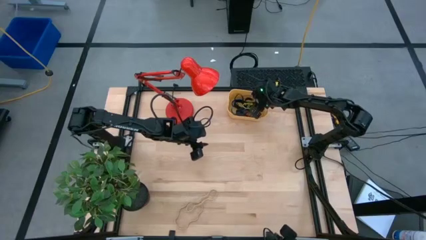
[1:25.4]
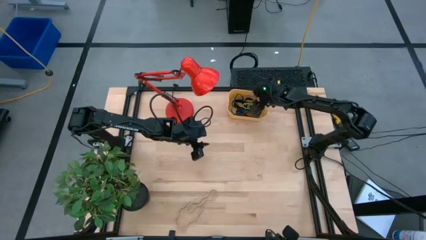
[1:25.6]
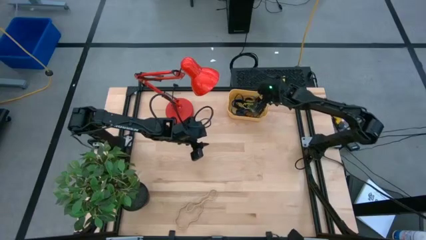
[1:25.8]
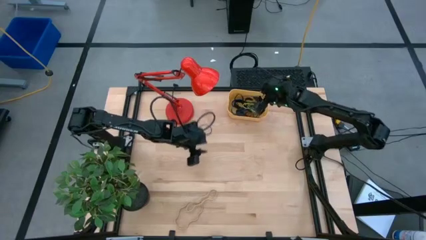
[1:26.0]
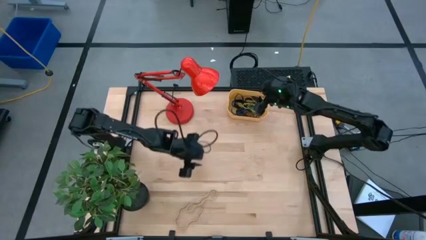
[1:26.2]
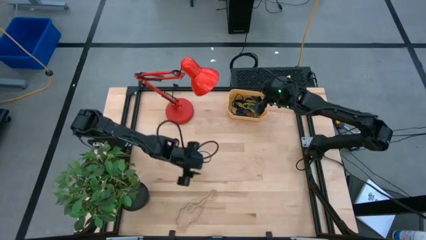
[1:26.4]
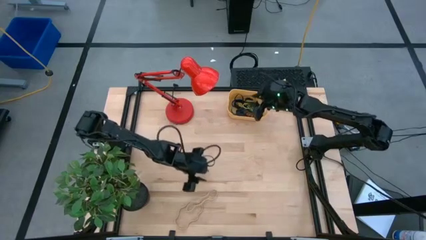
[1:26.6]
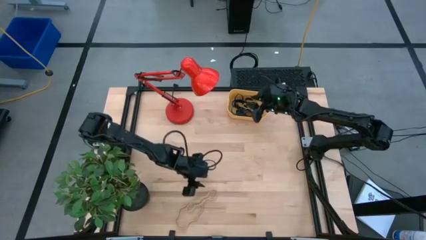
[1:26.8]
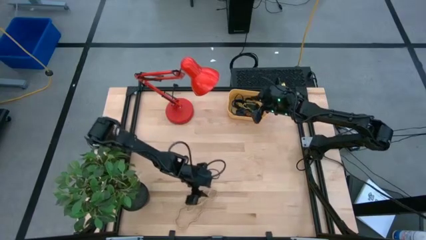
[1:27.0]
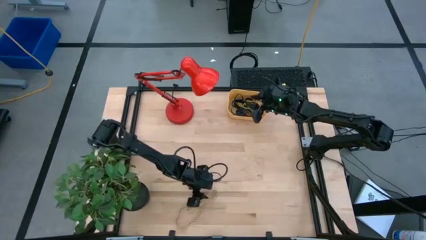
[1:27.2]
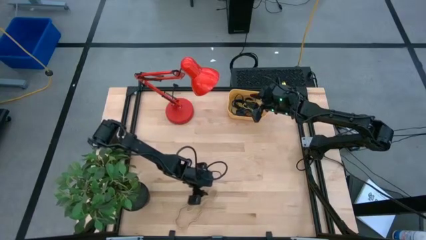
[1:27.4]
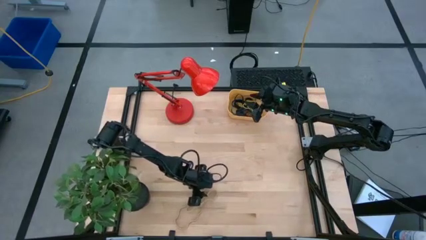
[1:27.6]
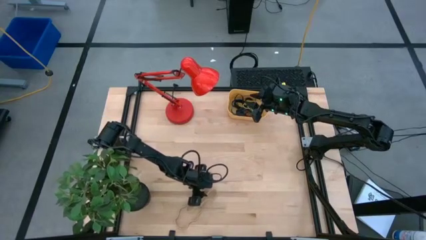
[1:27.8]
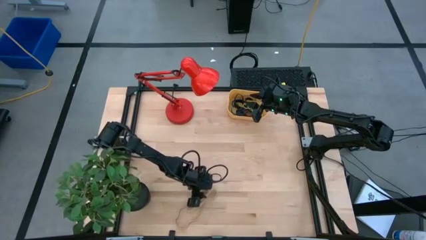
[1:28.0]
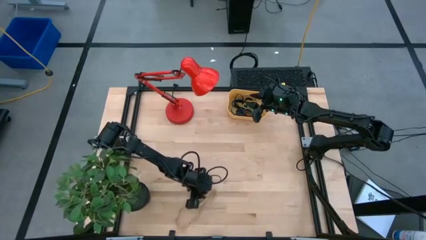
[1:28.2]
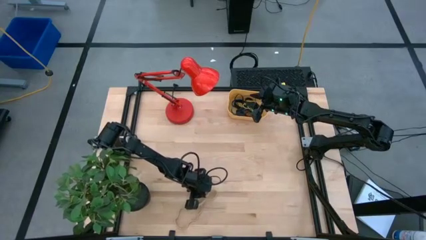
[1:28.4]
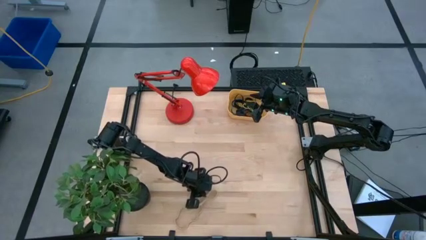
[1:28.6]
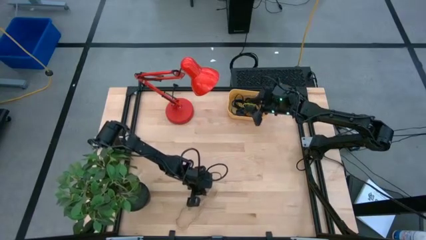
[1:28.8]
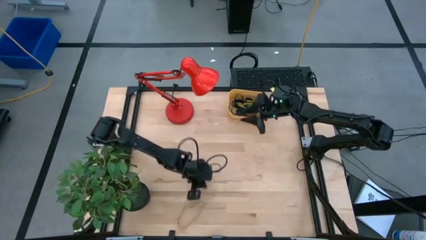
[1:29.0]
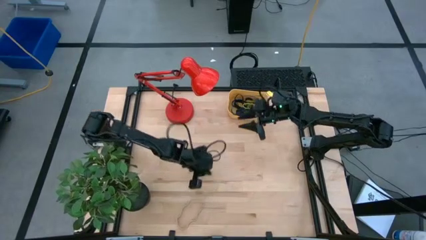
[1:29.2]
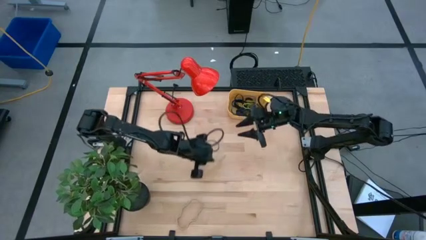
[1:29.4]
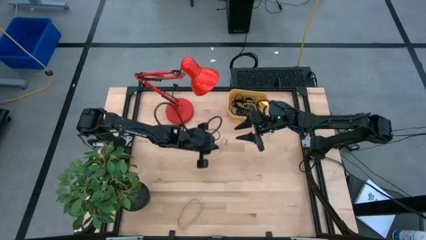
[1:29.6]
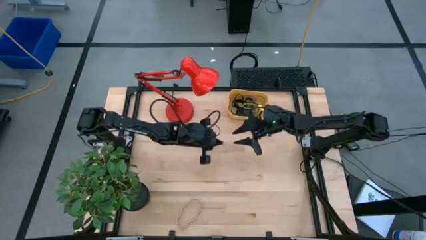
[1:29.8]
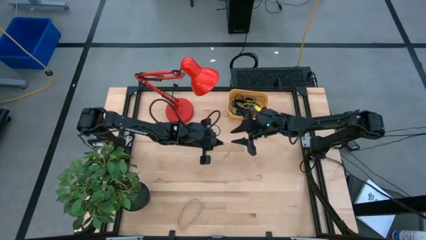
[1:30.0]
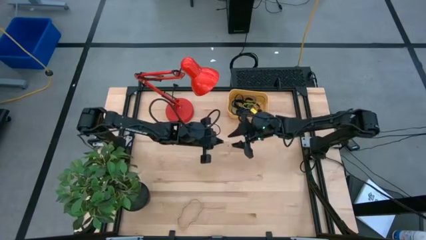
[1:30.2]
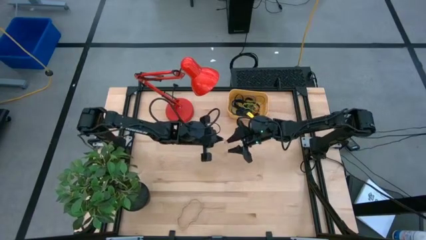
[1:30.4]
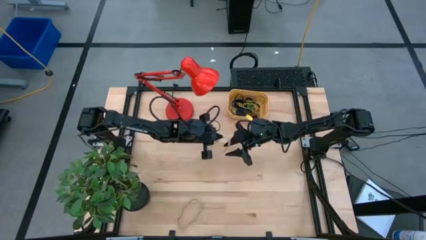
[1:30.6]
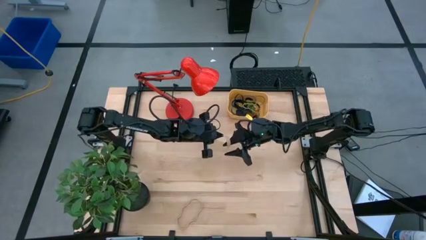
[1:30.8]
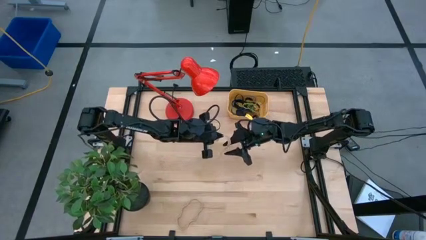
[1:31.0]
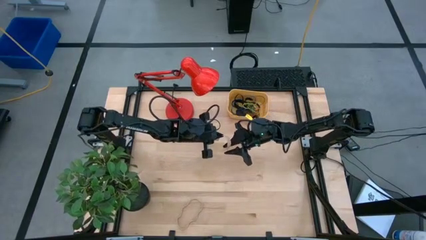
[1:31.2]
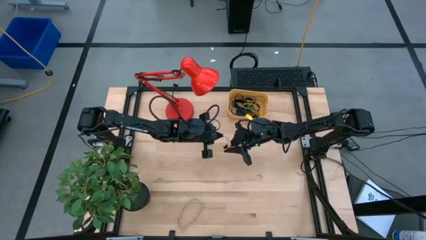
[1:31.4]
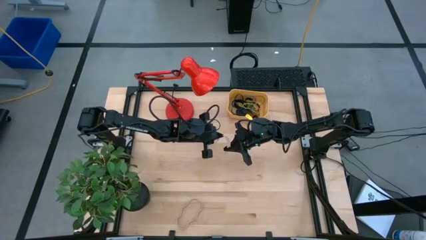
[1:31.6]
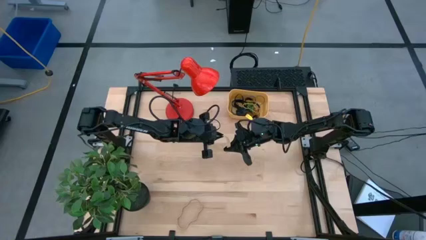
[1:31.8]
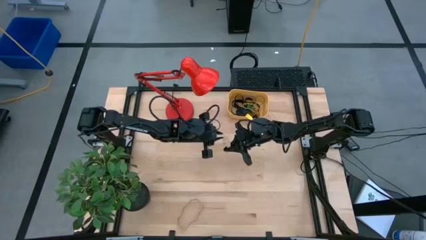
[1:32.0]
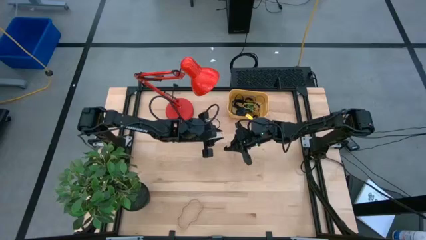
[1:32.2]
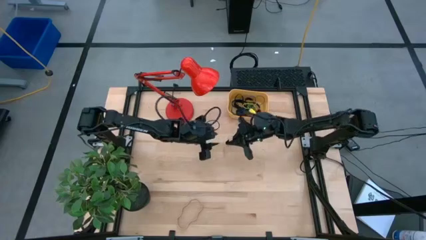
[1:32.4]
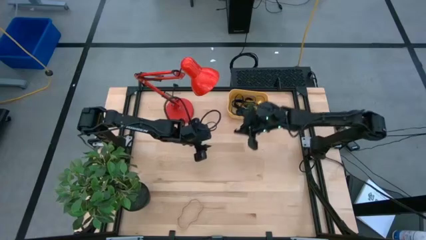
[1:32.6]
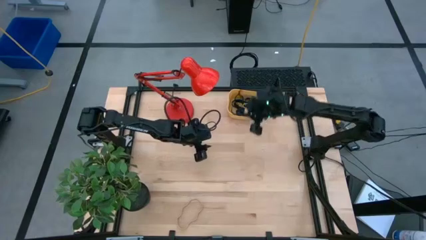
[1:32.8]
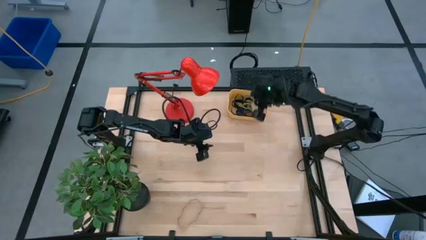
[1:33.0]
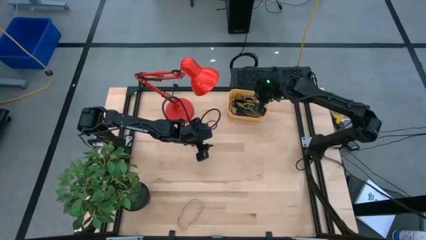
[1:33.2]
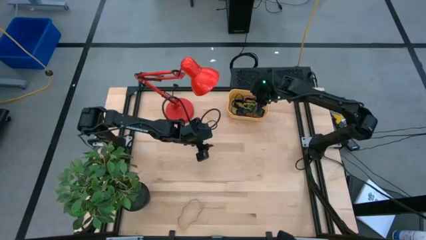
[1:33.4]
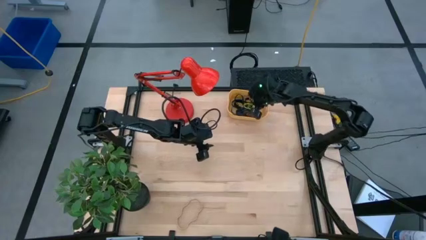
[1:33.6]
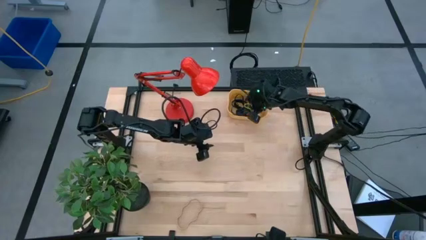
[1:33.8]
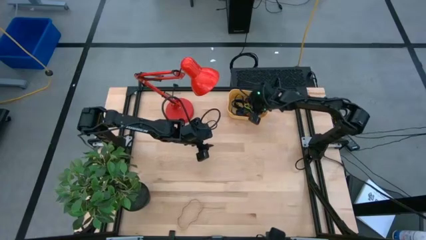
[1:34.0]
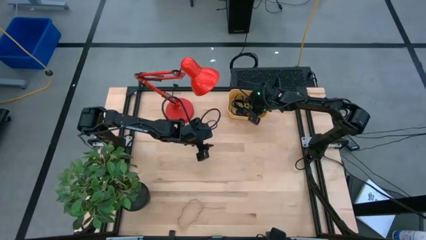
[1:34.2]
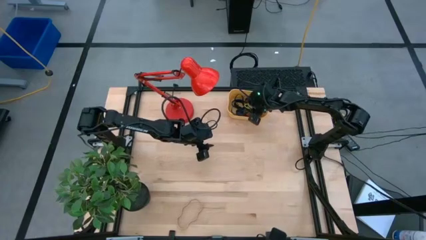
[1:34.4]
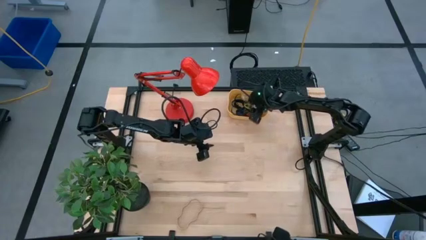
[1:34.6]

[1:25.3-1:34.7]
Task: Pick and place rubber bands into bin
Put the top white rubber band into the yellow container

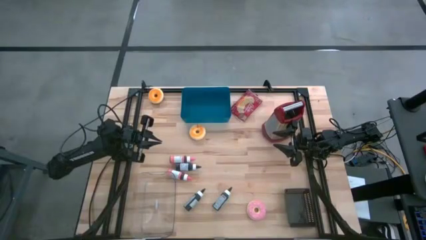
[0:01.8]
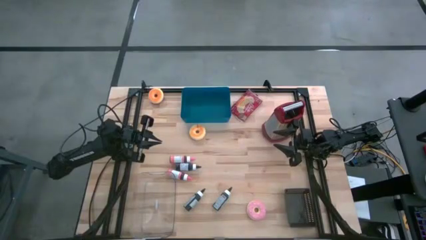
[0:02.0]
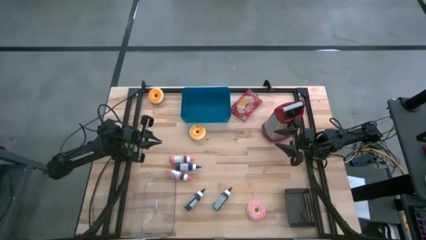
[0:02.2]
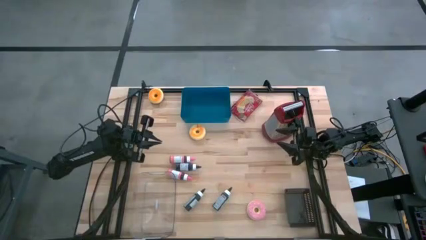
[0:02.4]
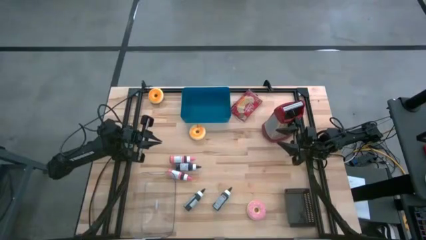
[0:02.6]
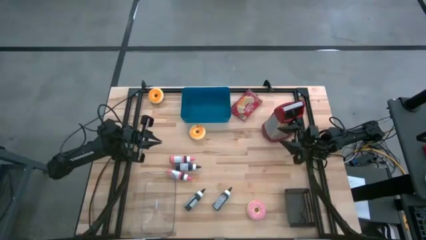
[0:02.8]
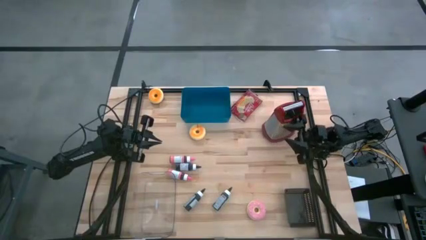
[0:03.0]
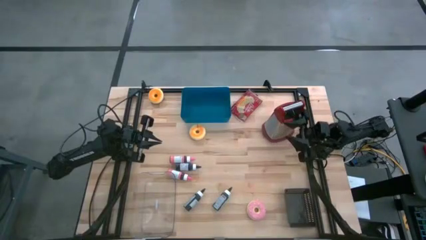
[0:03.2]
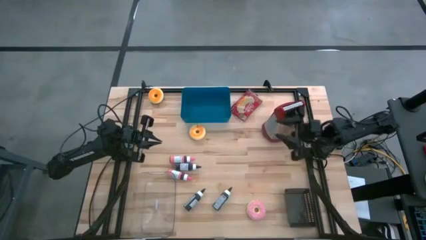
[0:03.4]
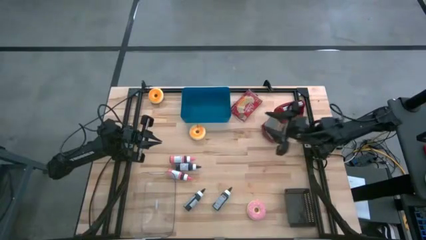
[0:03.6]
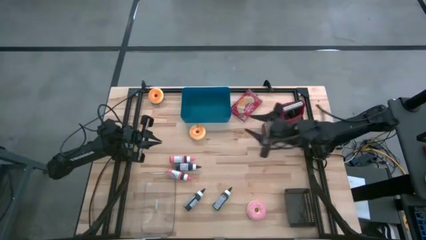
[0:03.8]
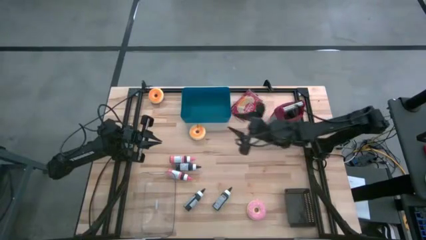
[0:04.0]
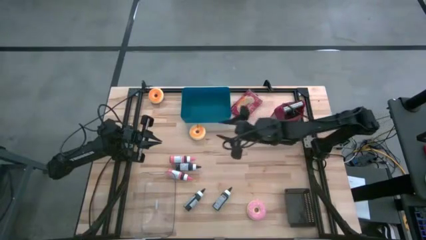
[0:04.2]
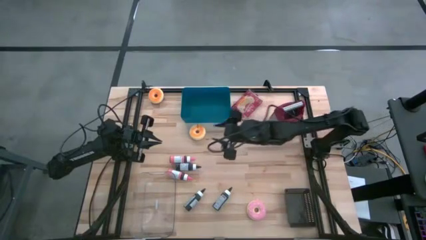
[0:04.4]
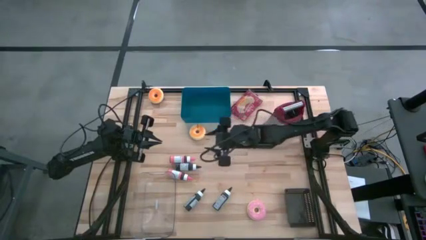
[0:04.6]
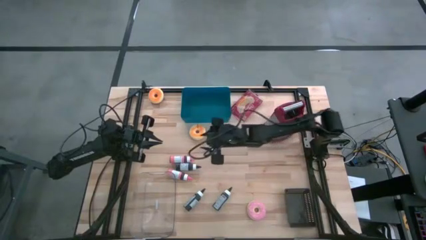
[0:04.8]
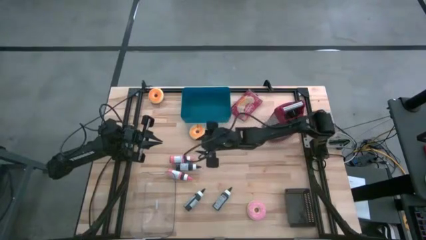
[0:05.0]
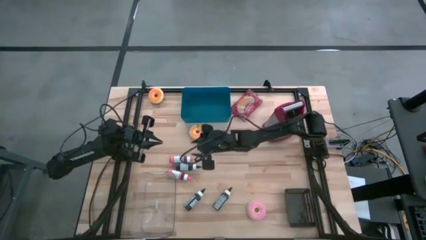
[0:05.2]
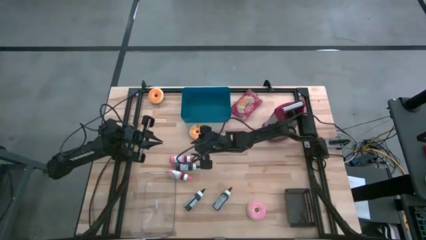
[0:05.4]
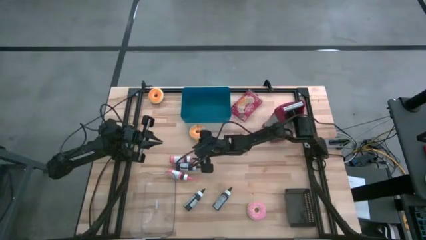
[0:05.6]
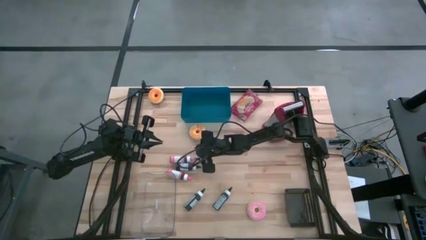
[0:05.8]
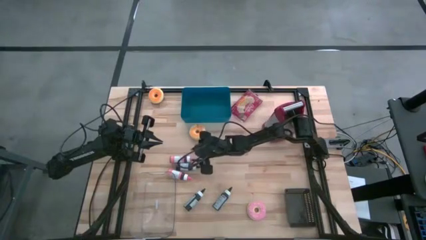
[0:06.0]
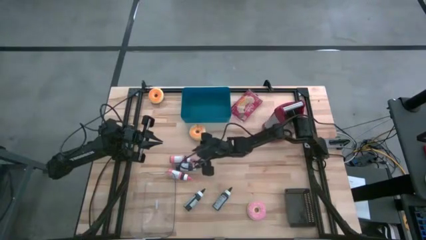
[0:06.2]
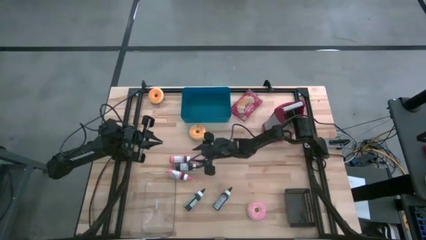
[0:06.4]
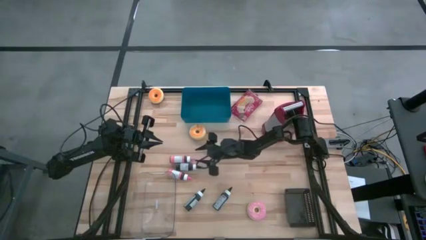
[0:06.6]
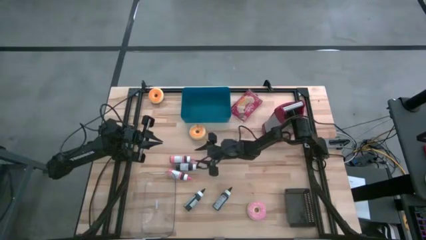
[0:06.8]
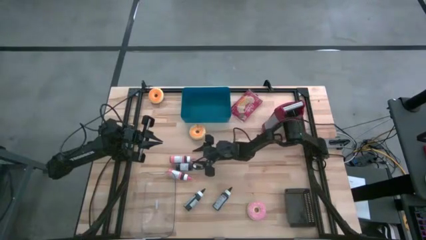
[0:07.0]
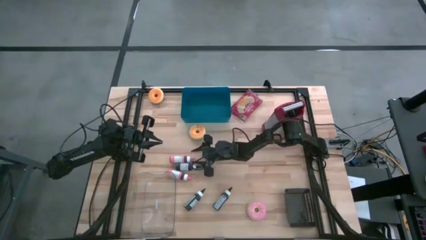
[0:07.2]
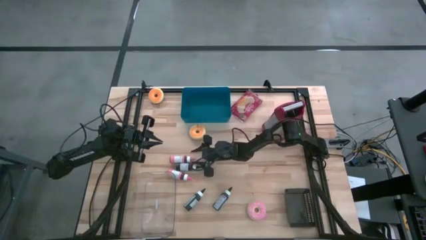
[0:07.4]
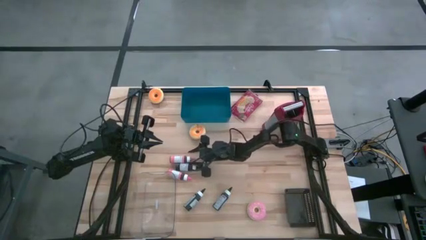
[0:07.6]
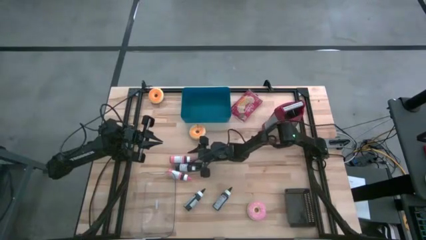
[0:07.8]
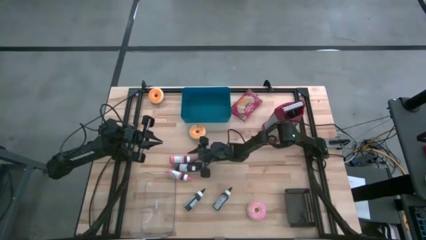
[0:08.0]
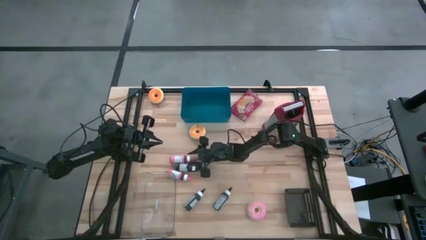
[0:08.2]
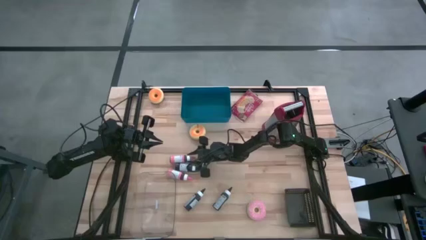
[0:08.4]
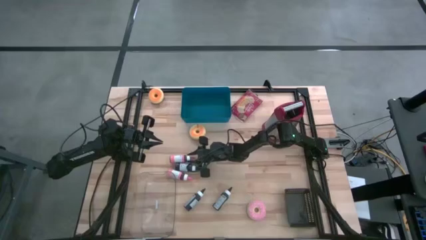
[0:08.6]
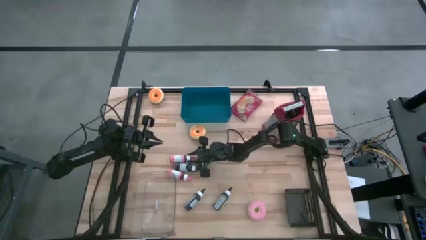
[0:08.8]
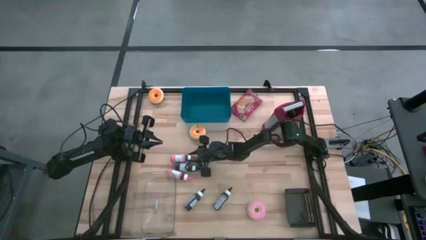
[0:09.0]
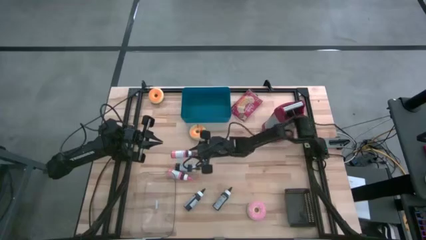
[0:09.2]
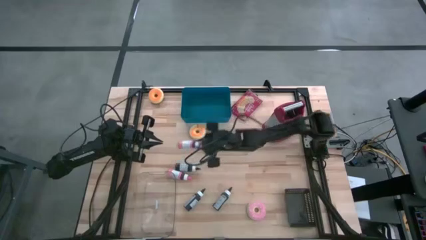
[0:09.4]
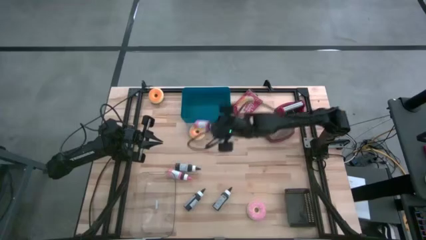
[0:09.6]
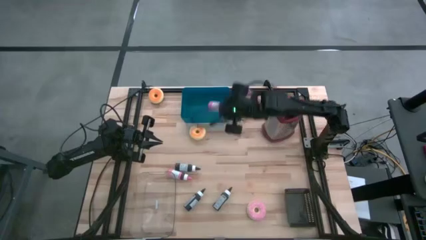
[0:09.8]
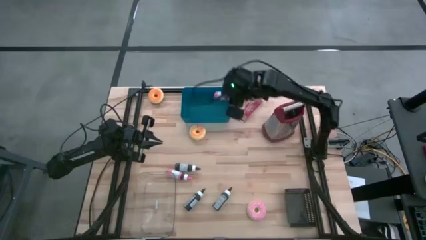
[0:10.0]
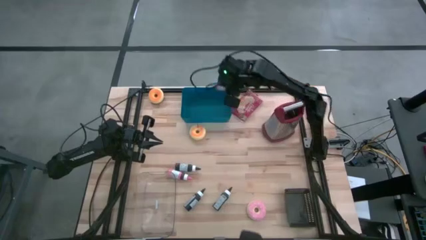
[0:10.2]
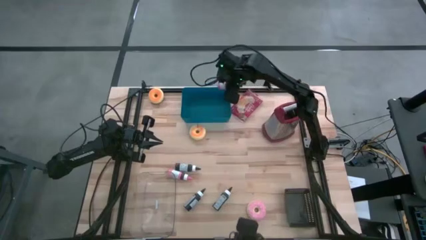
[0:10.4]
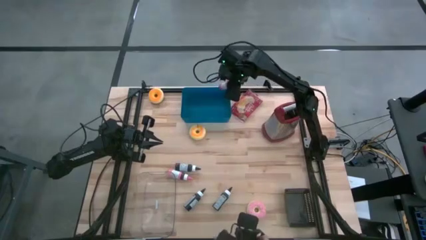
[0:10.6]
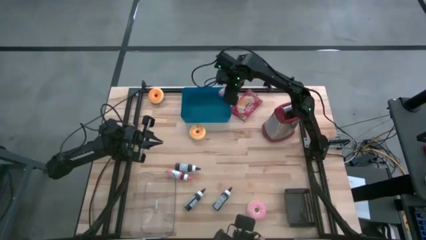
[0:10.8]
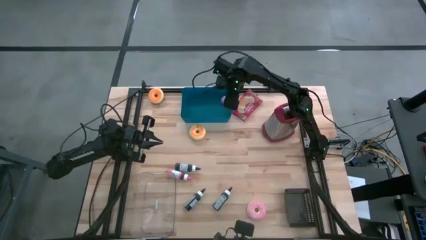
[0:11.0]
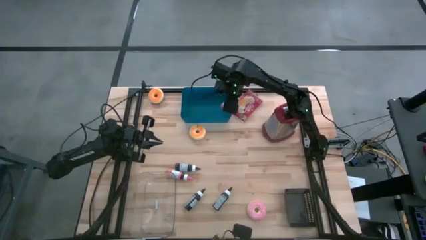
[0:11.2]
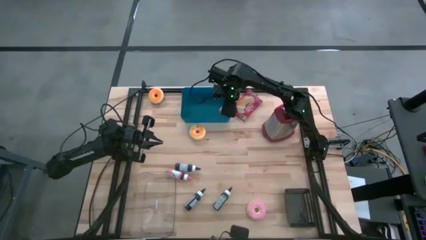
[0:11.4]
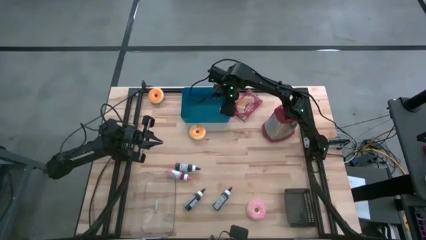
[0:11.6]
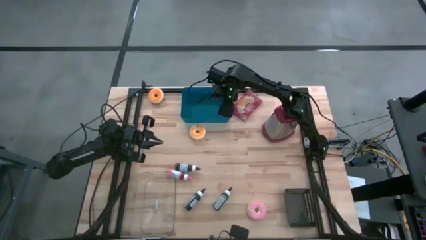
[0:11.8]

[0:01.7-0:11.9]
Task: Pick & Place Food Item
Put the top pink food coloring into the blue bin
